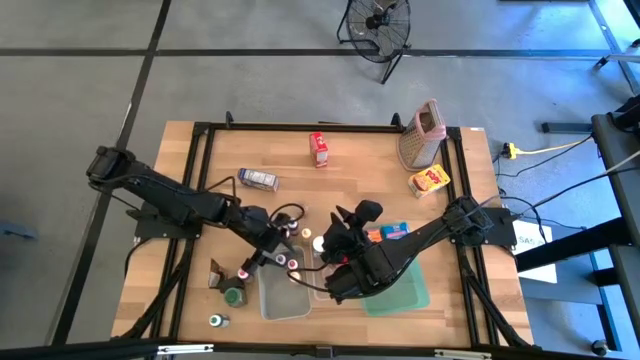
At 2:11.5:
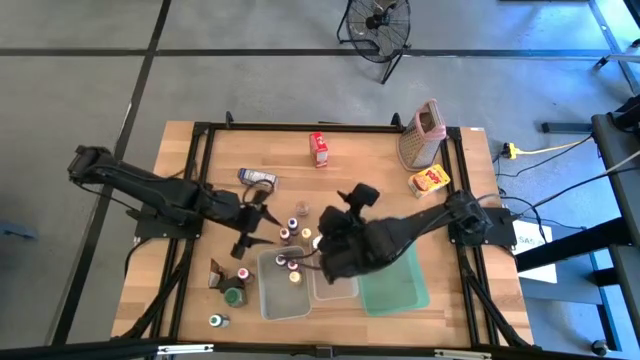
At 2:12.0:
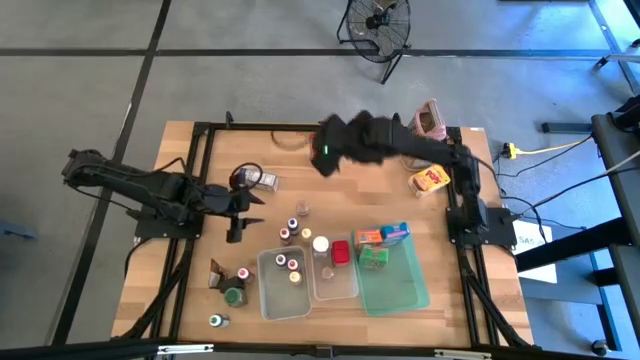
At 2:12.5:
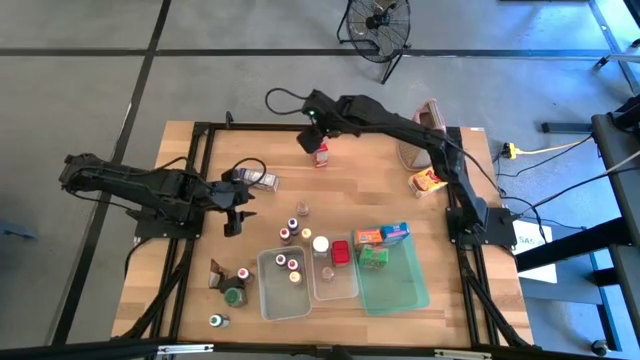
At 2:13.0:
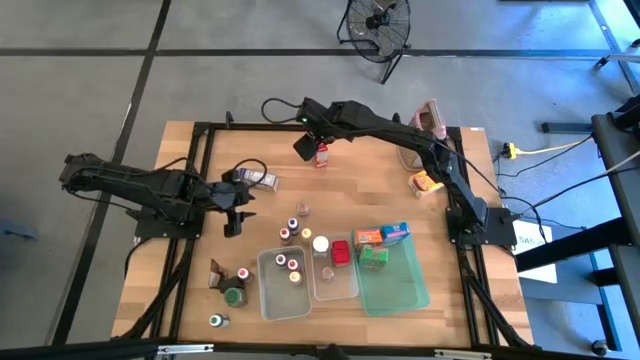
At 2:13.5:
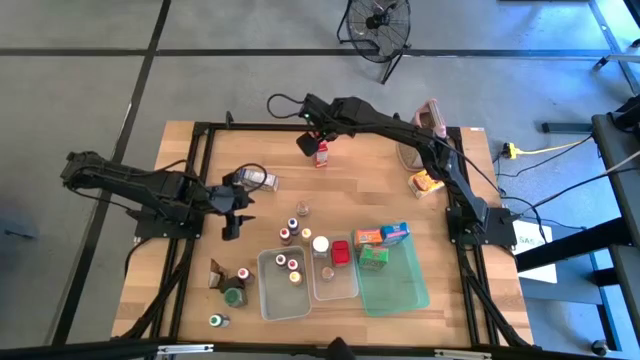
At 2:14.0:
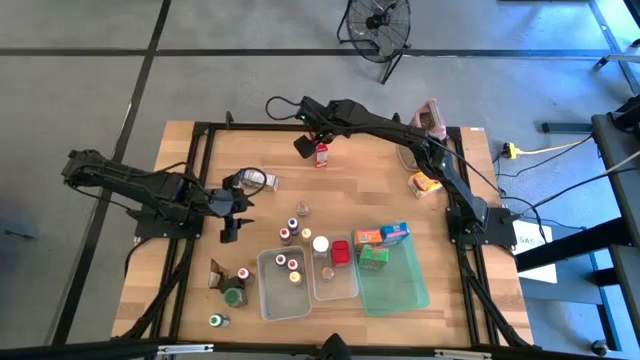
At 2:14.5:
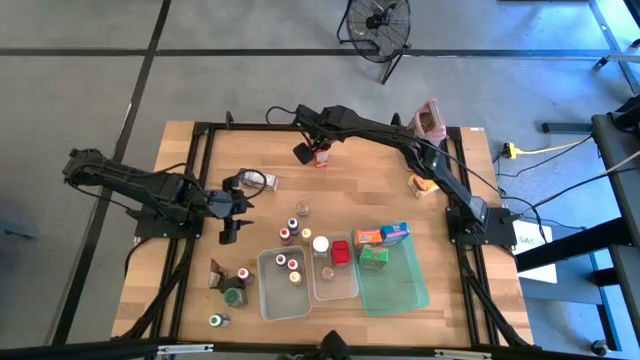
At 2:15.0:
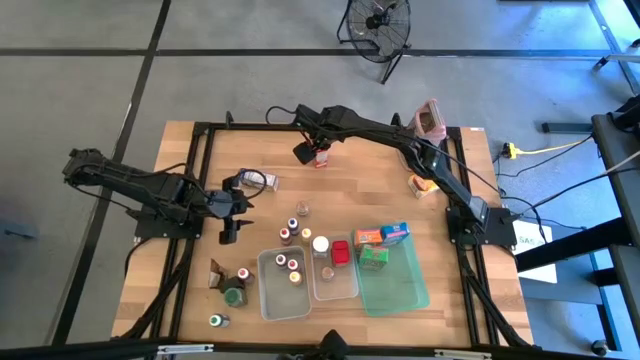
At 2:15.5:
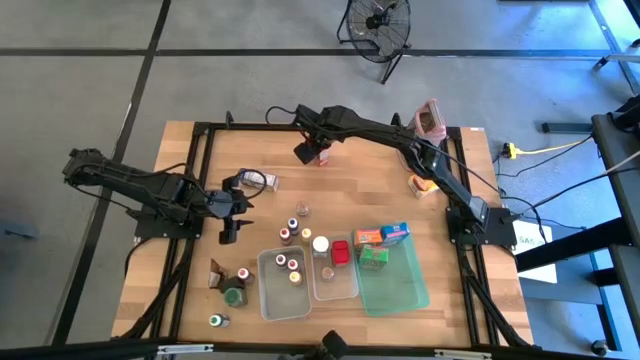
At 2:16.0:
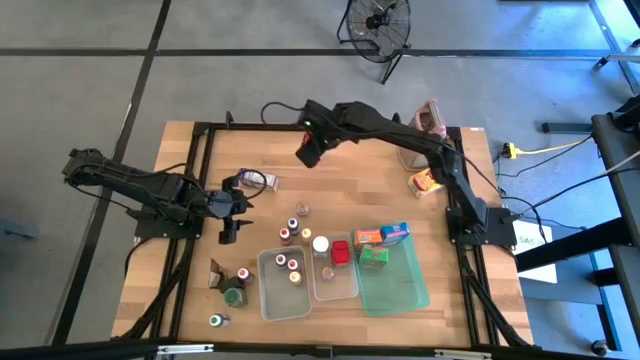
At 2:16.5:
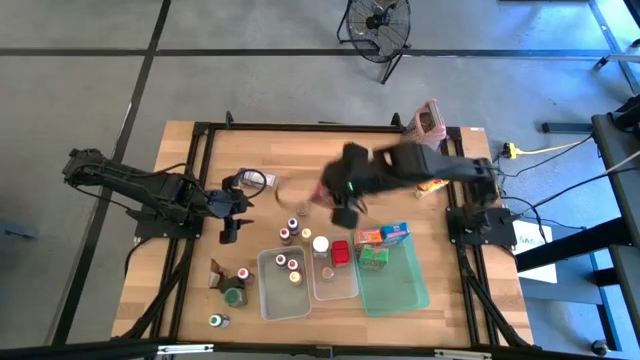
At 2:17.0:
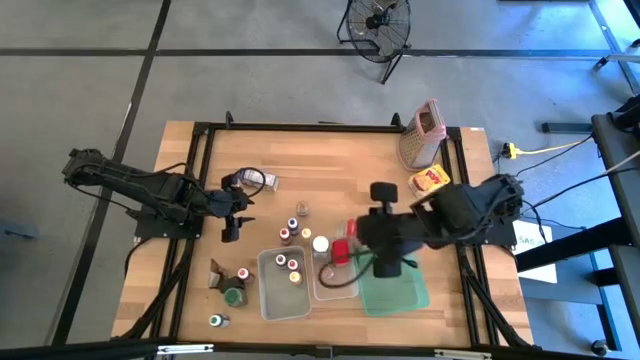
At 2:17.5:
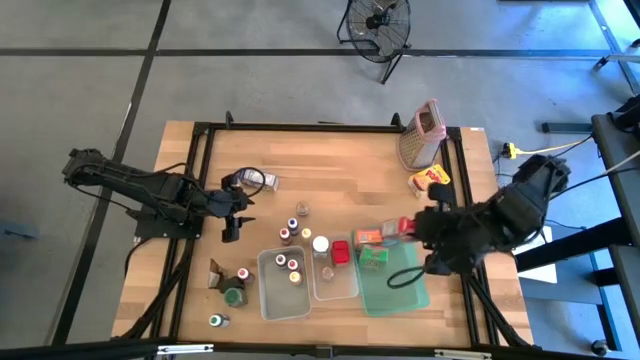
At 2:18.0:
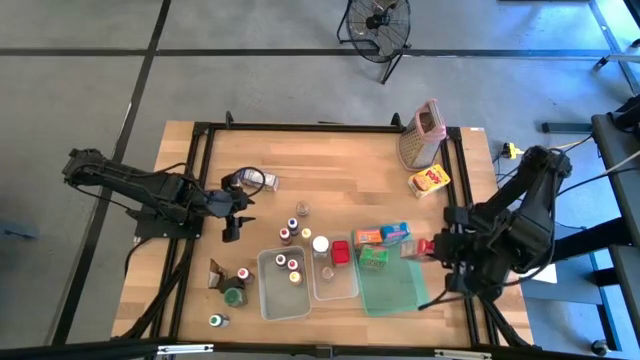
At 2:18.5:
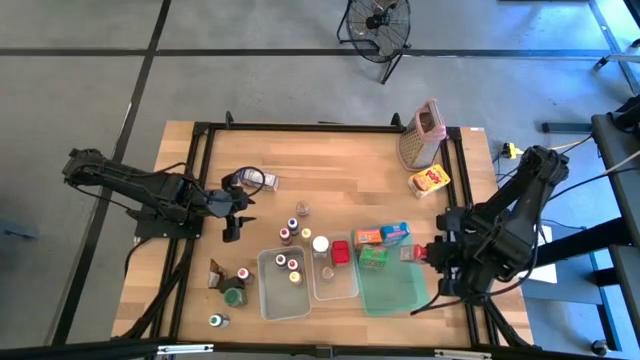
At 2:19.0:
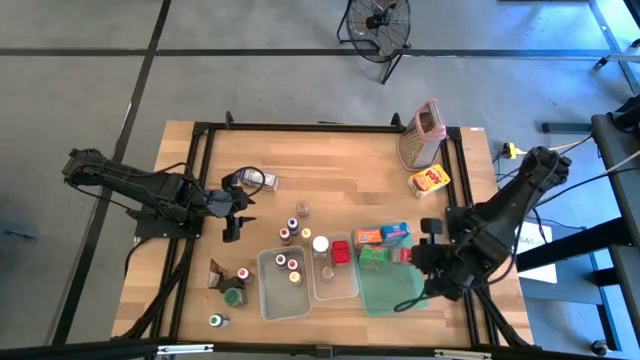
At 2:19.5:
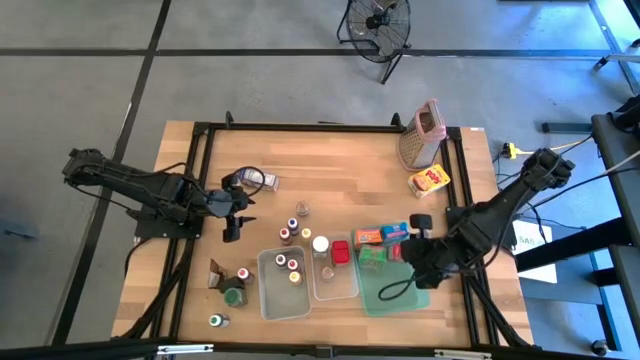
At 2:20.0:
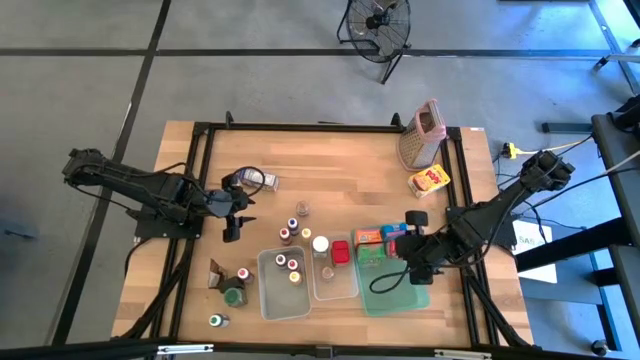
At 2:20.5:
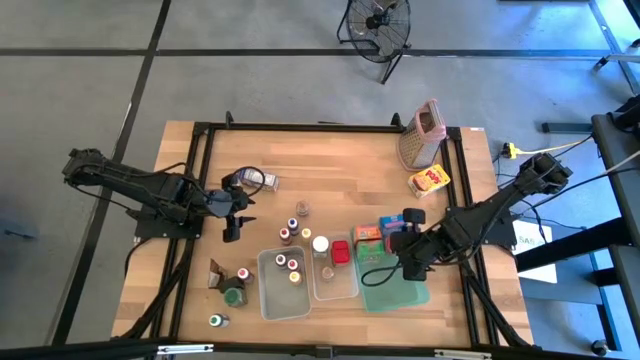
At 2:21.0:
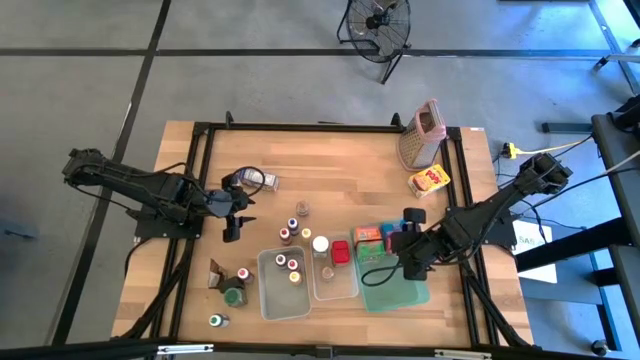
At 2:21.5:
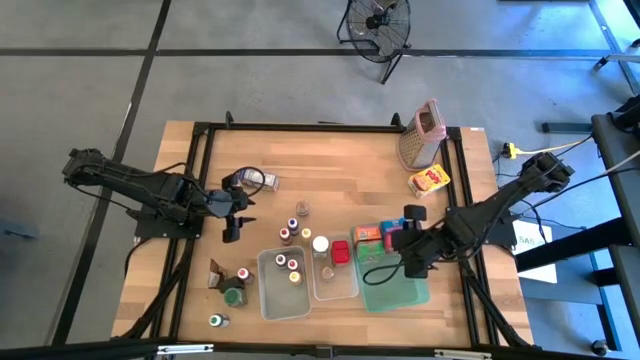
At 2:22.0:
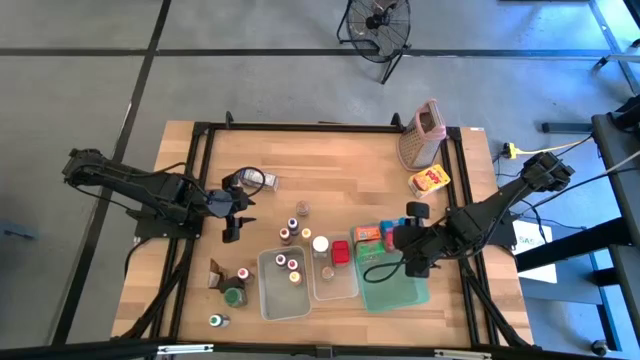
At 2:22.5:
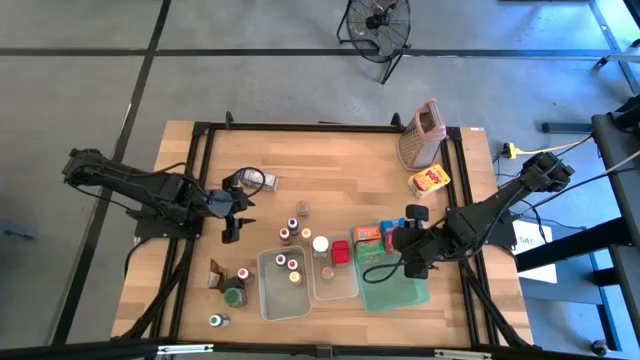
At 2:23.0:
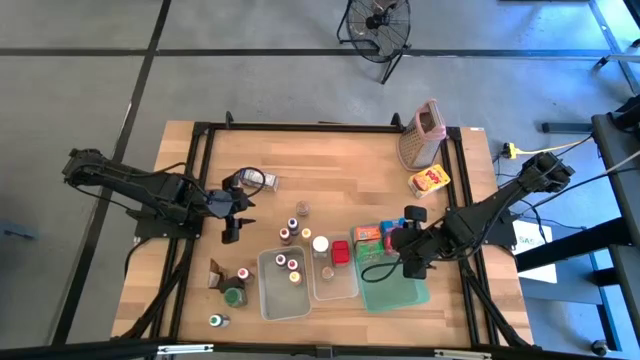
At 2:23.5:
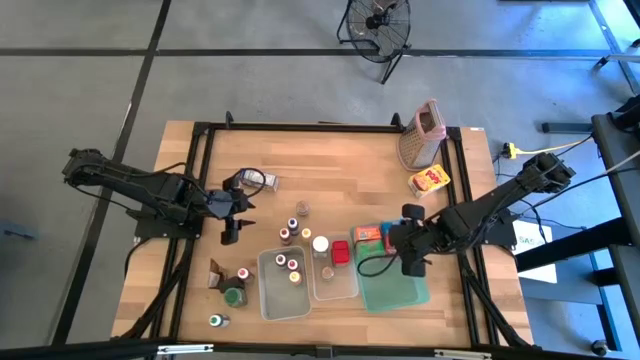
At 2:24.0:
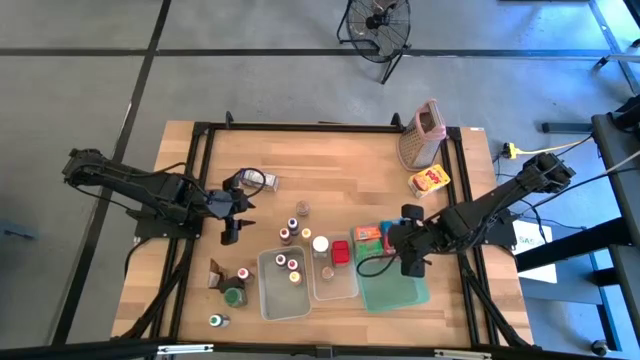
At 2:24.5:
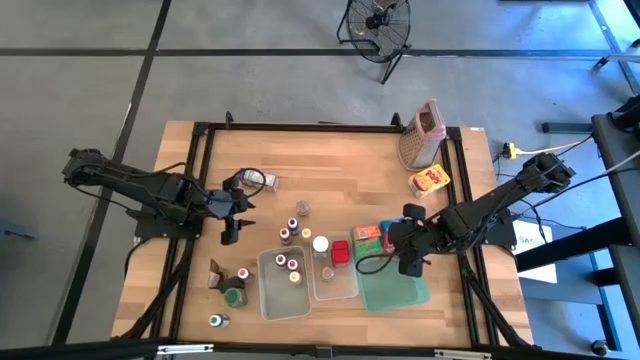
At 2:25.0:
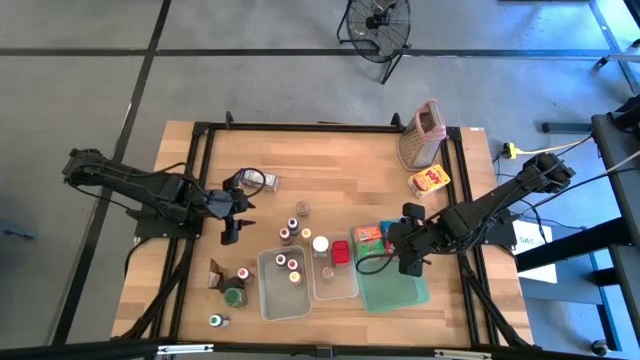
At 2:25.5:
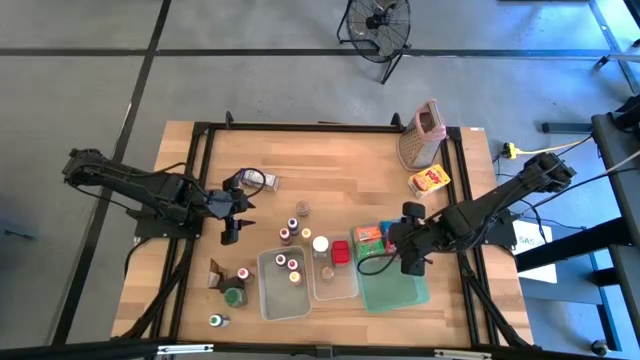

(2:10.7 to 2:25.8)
Task: Pick & Place Kitchen Items
Put the red cereal box into the blue bin

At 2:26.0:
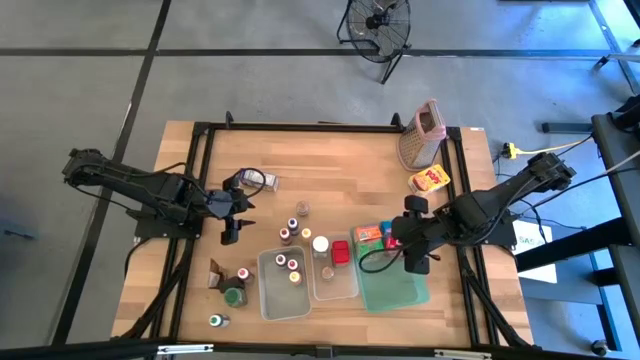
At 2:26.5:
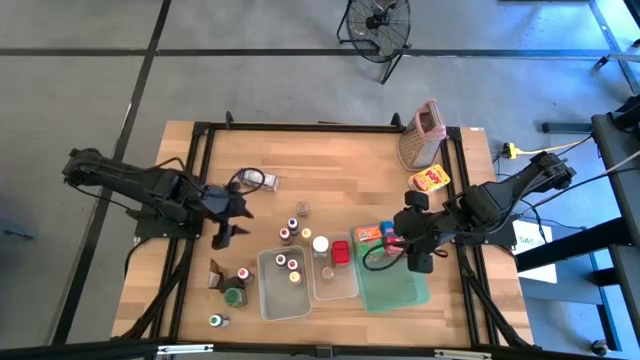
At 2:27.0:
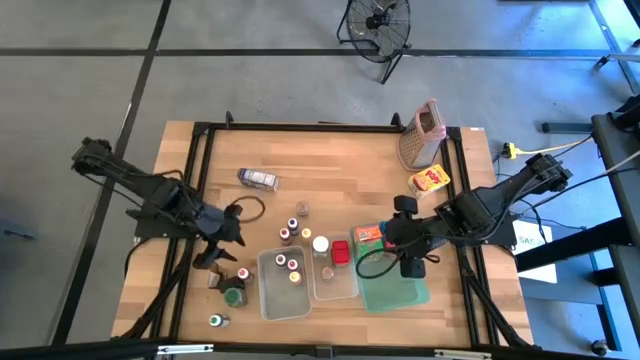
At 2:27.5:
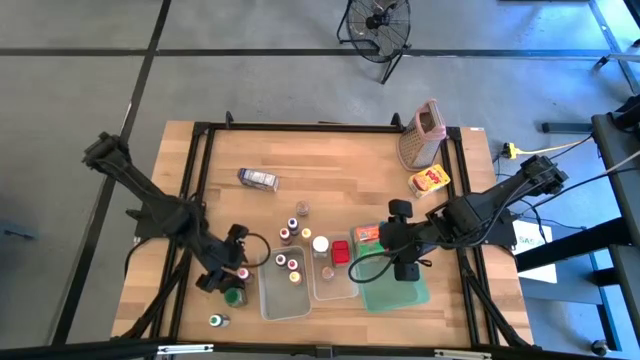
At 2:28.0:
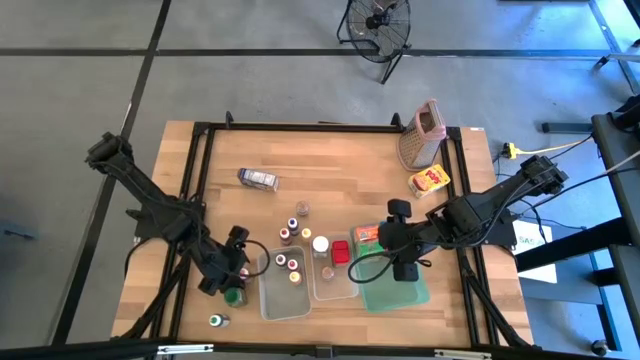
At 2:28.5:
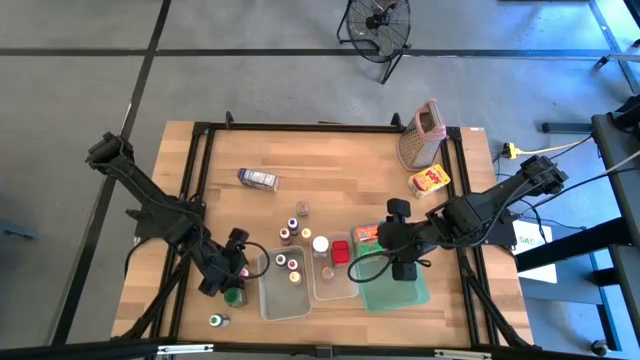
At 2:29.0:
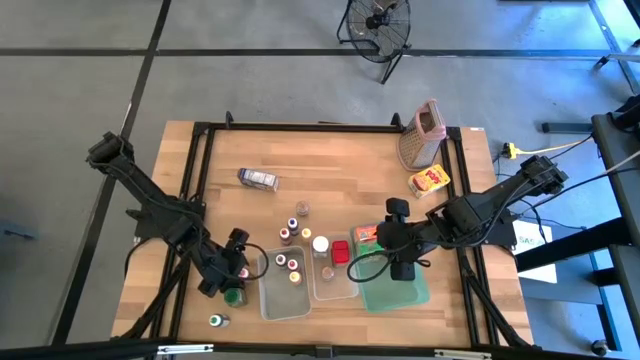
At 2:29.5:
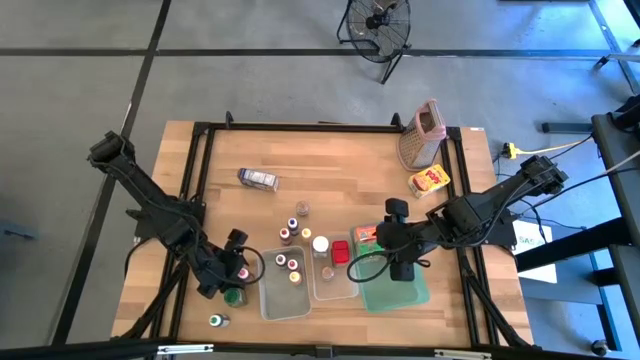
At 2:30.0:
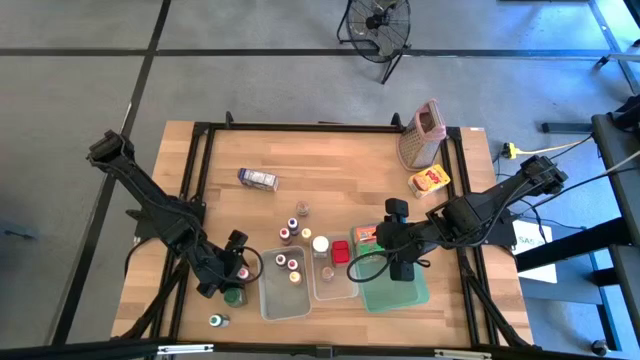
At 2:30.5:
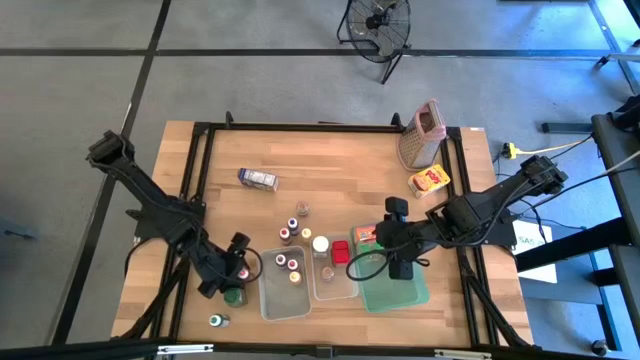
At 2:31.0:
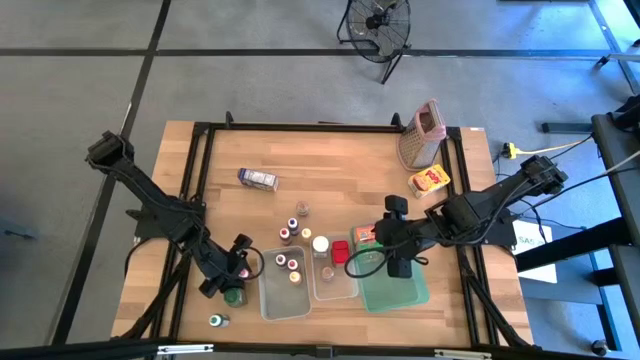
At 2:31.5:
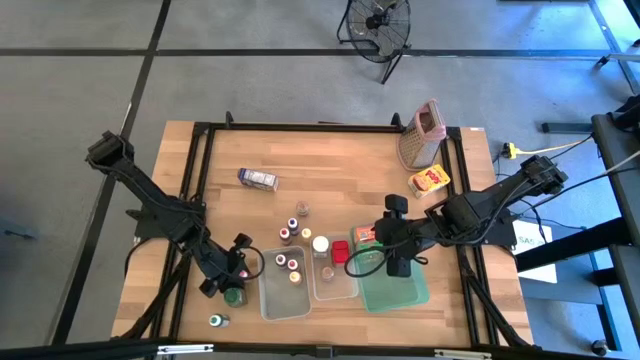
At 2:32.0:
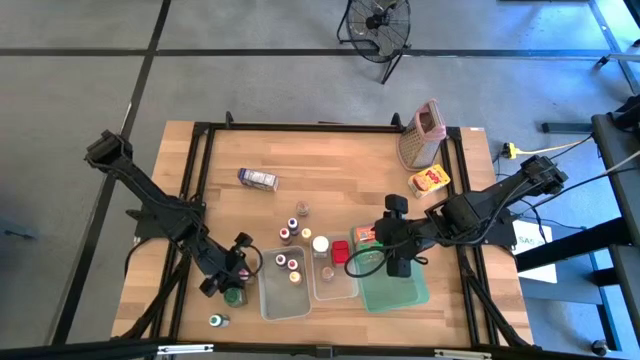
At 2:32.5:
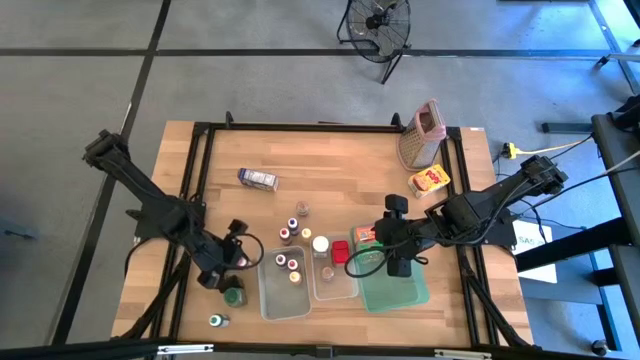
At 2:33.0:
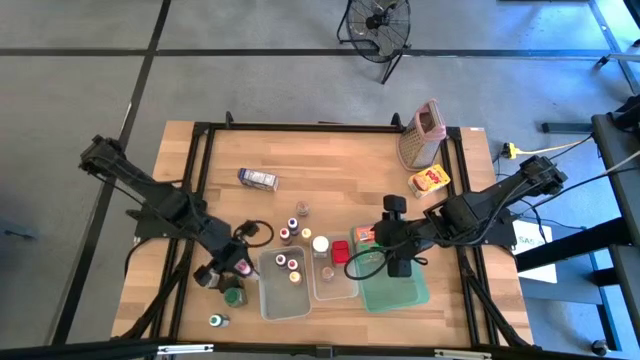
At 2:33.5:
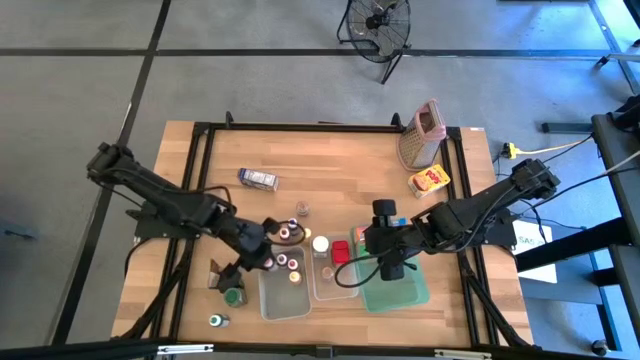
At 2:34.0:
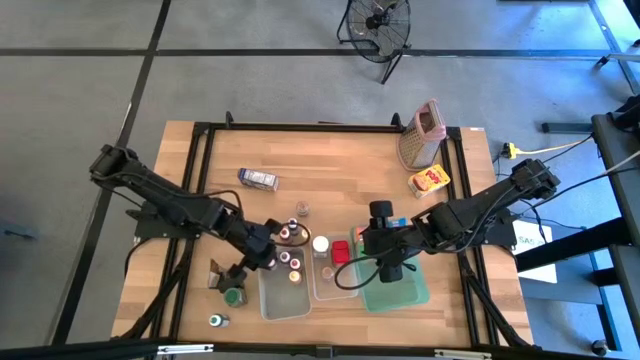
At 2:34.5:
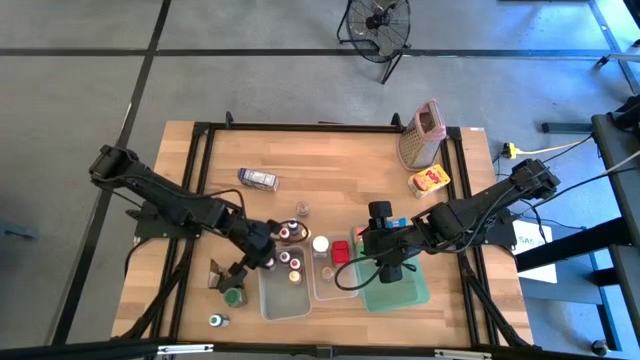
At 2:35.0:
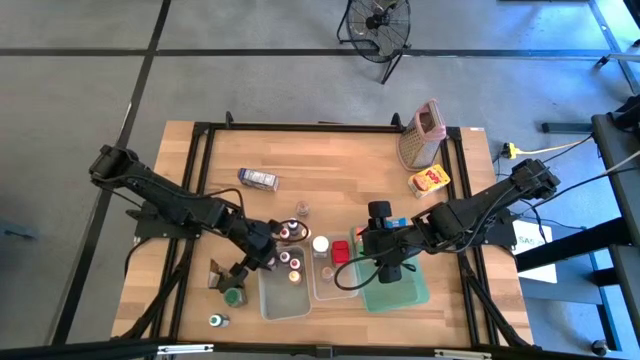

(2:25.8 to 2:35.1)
Put the pink food coloring bottle into the gray bin
